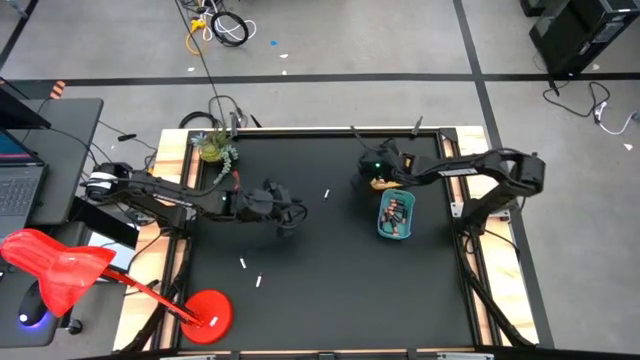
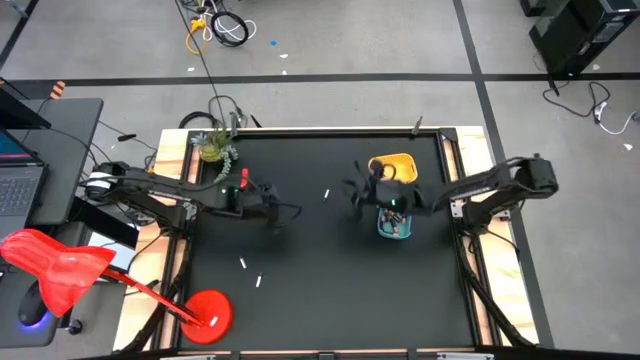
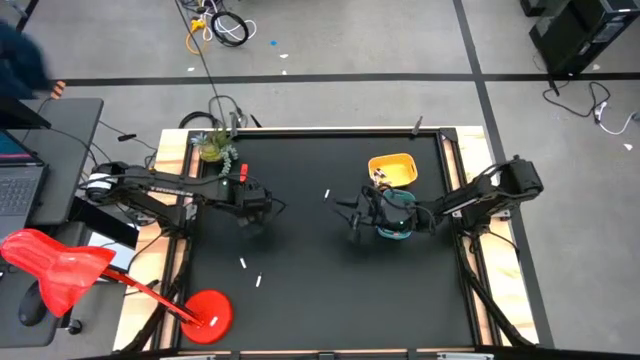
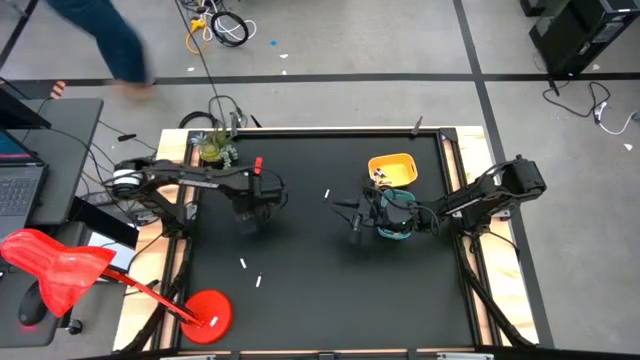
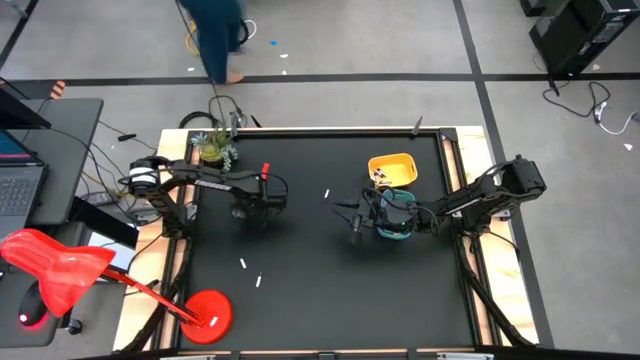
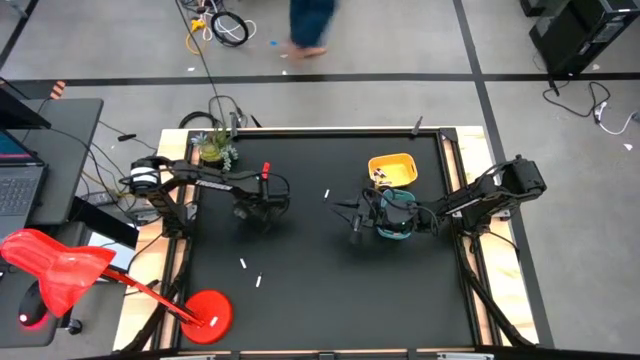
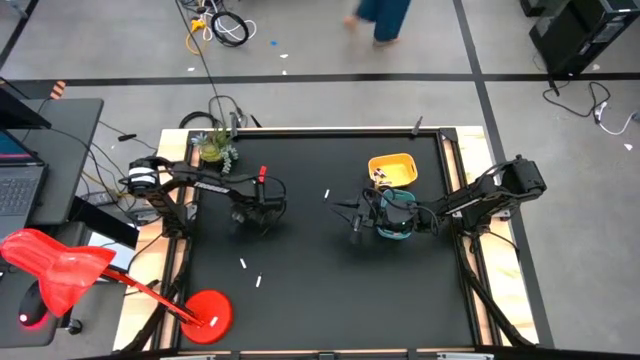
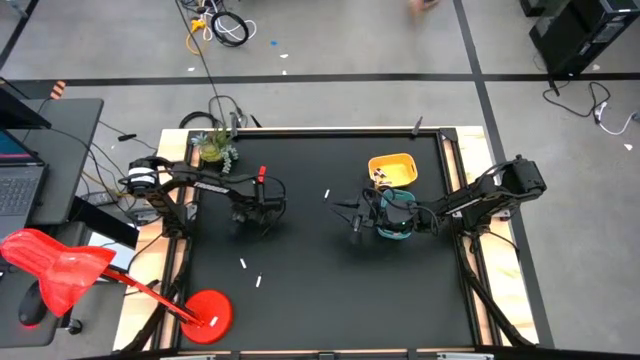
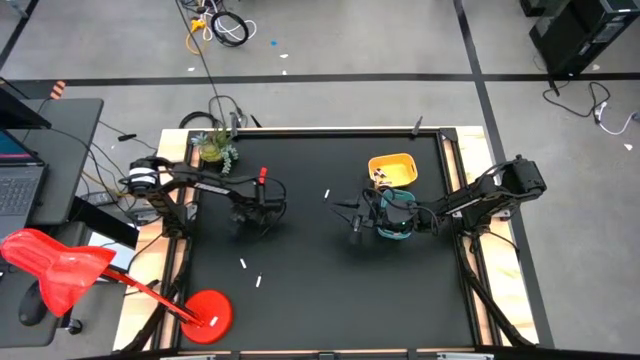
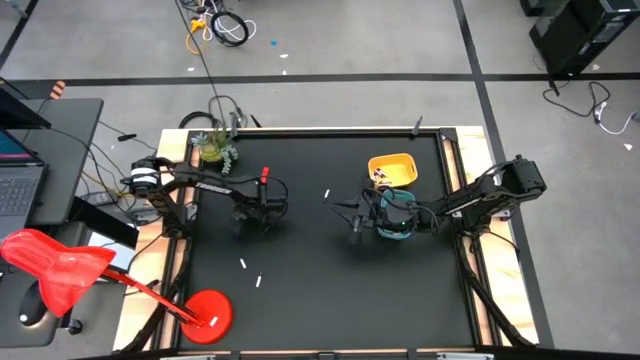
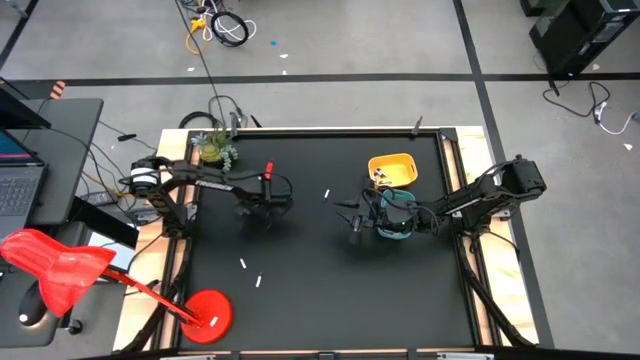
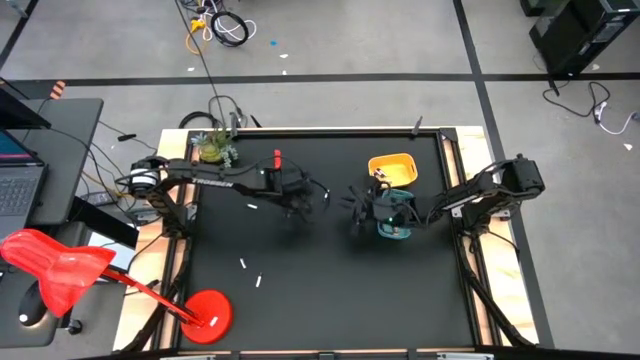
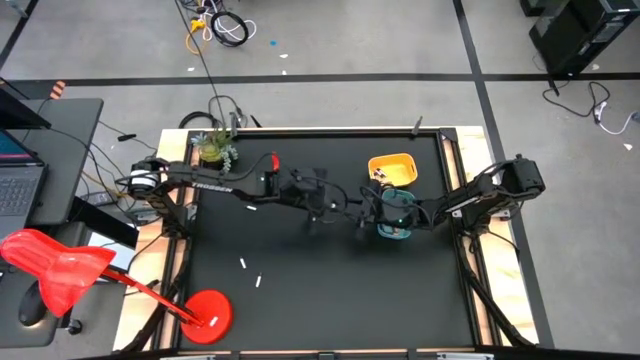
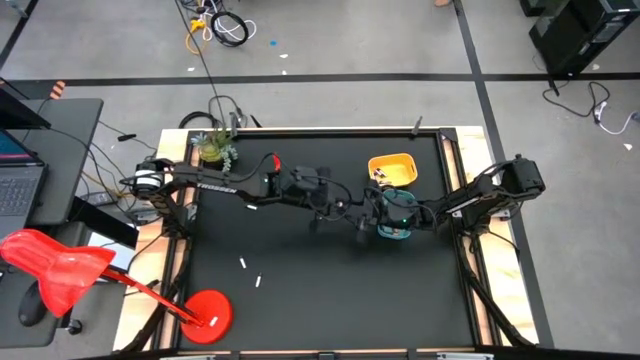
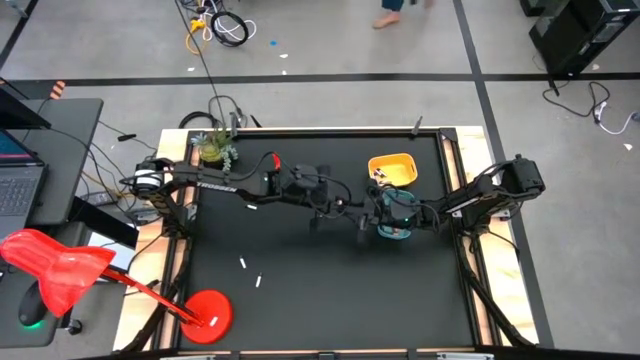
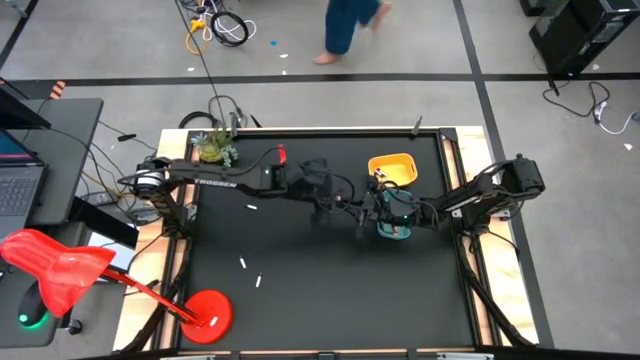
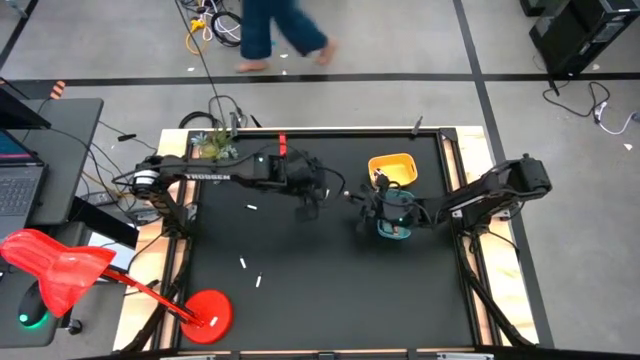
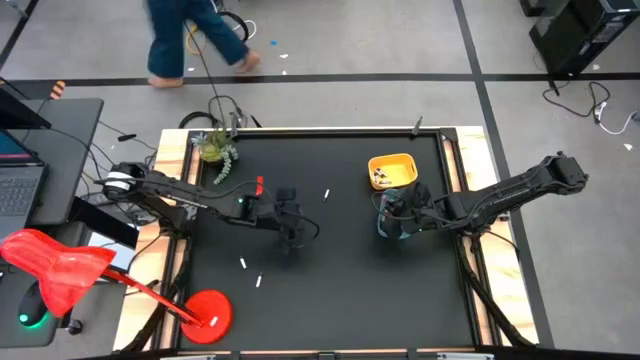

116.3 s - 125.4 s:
Task: Sort batteries
Put the gold black battery into the blue bin

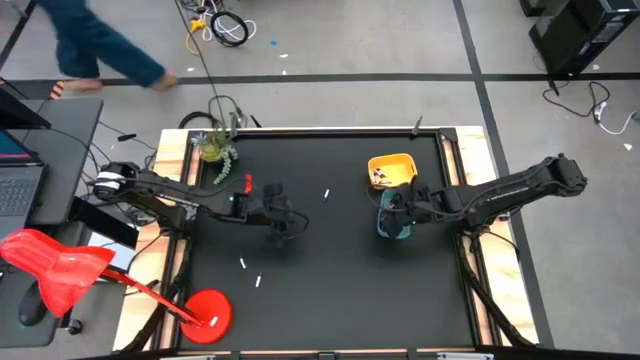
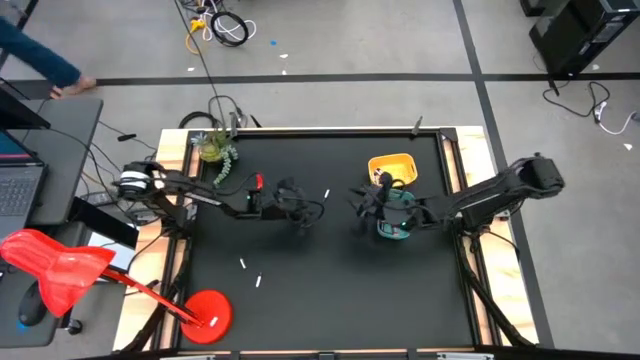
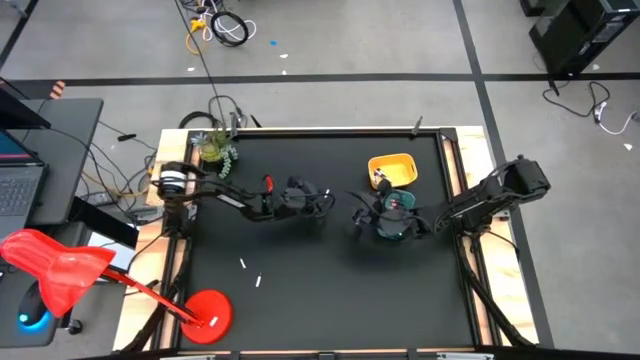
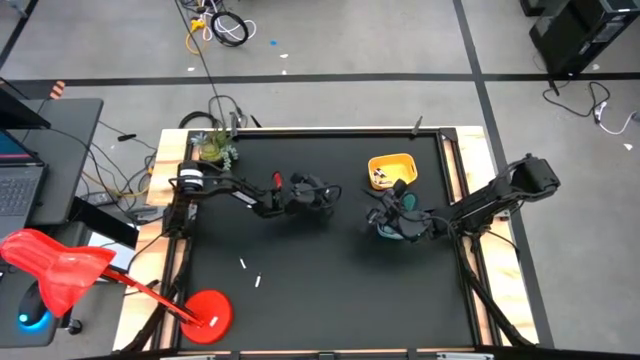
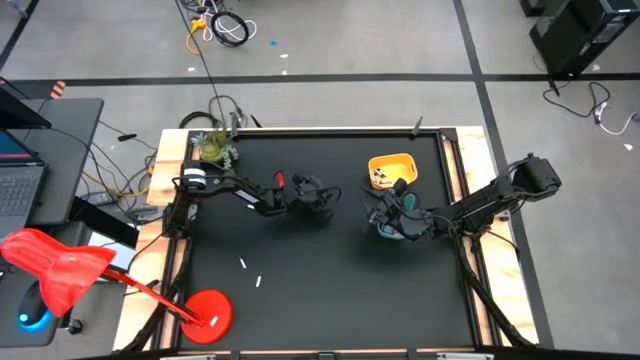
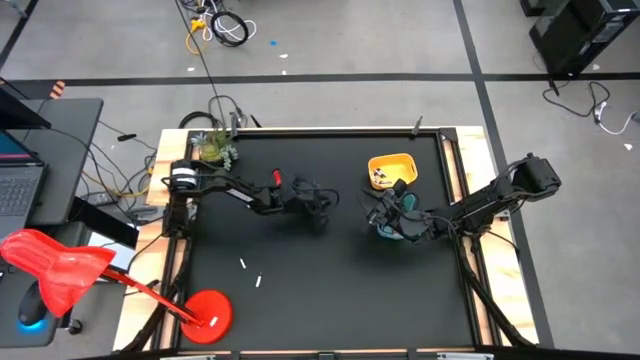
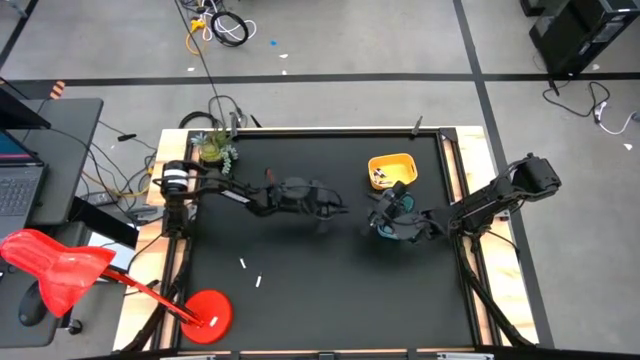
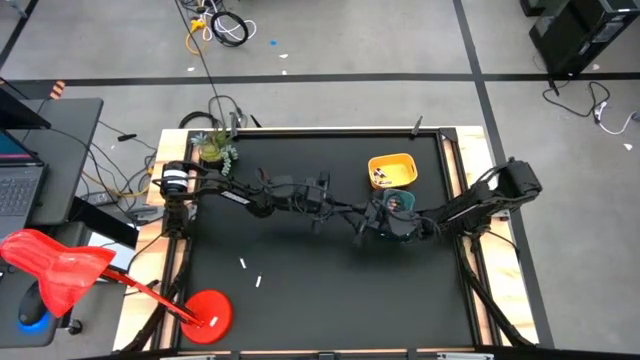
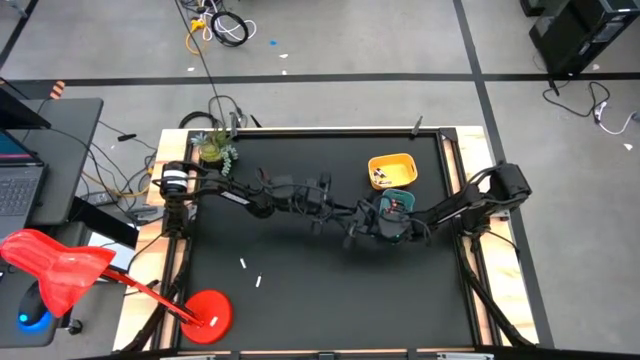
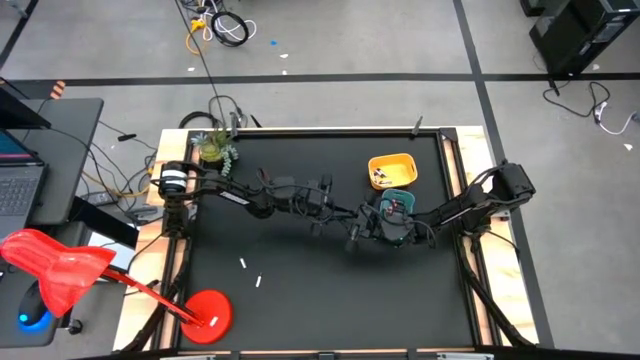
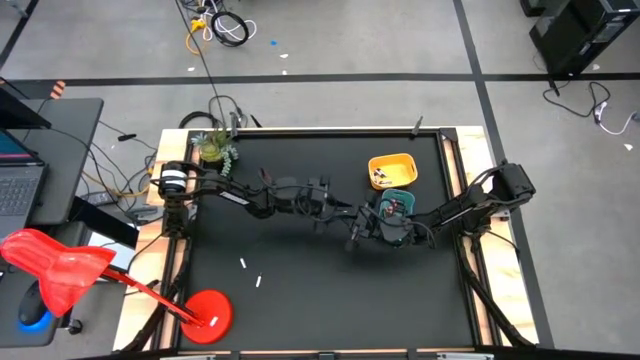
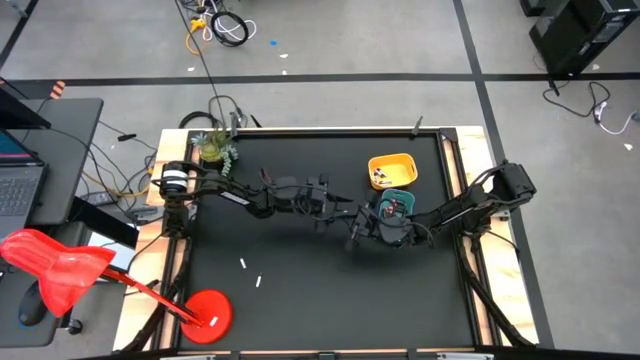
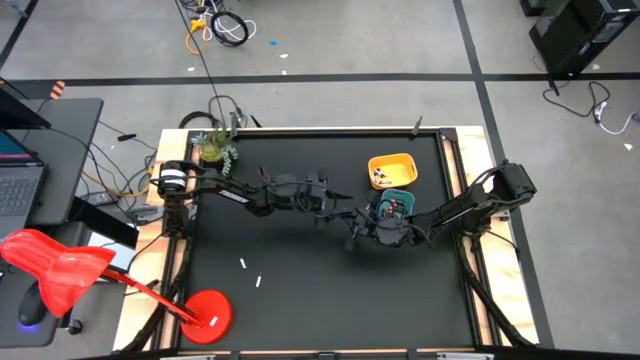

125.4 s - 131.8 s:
Put the silver black battery into the yellow bin

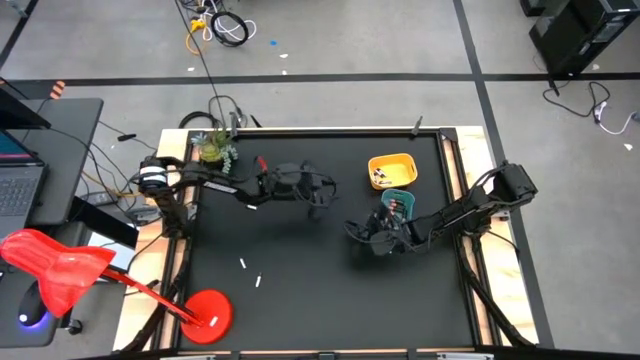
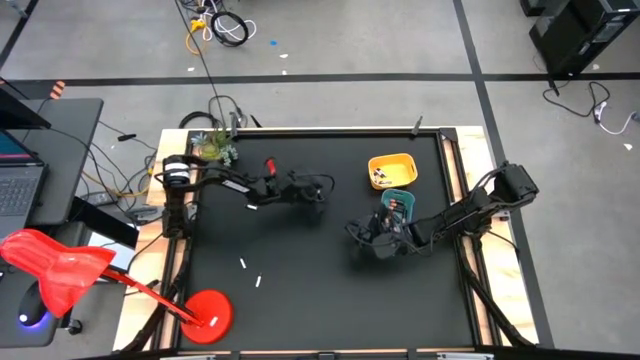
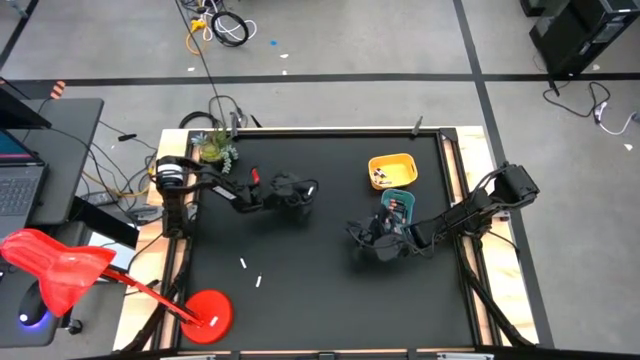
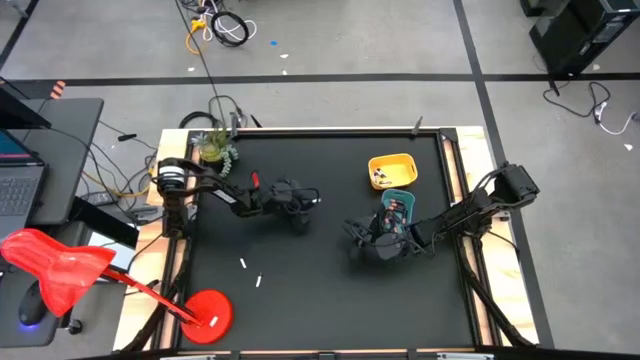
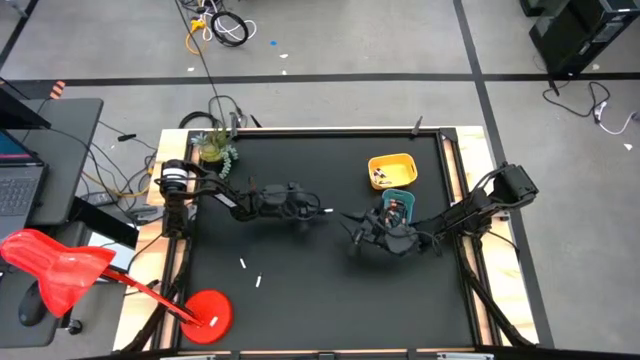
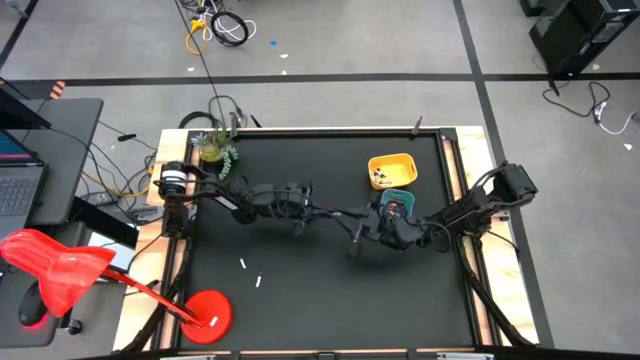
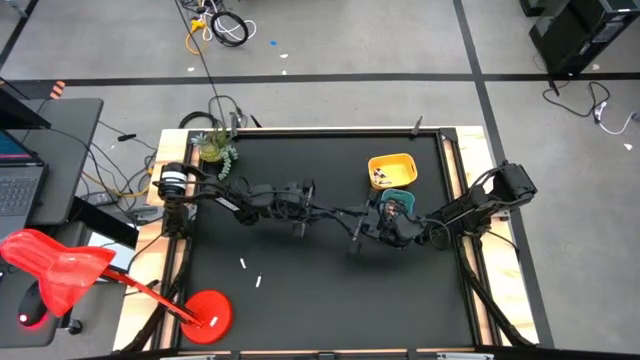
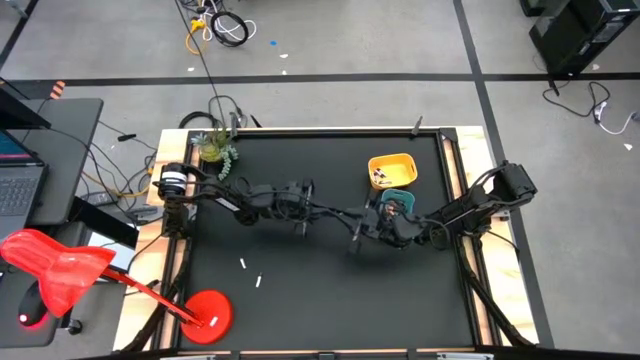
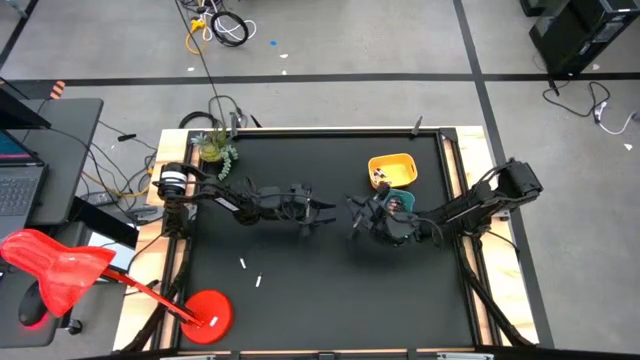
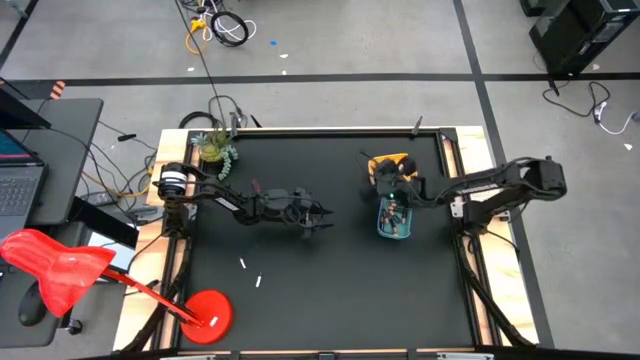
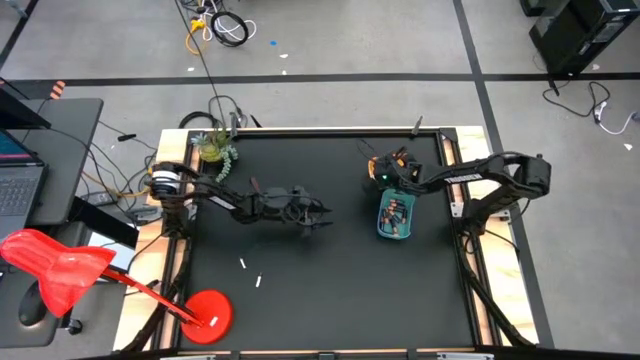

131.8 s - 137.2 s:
Put the silver black battery into the yellow bin
